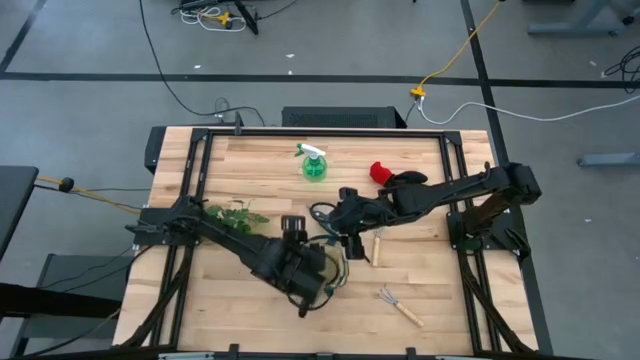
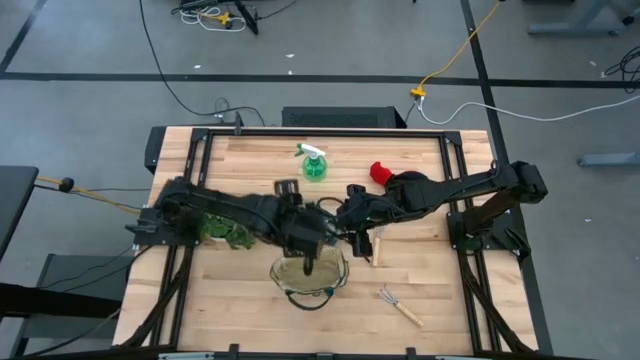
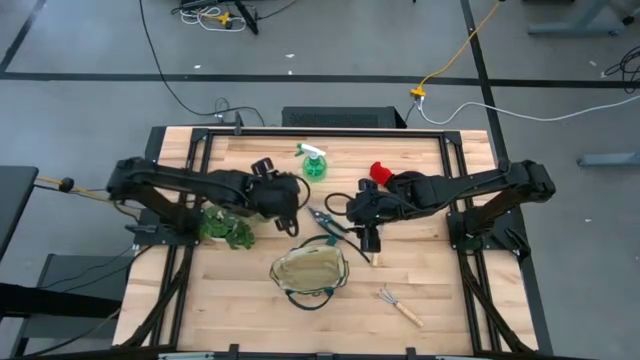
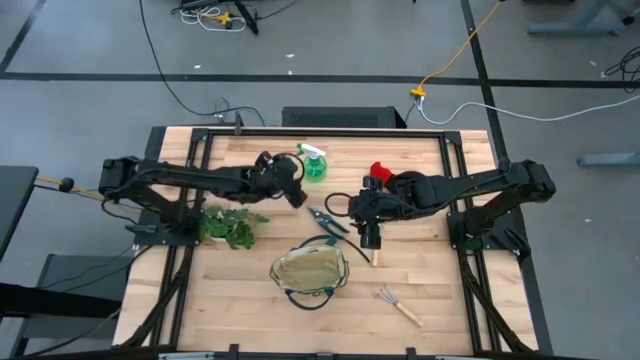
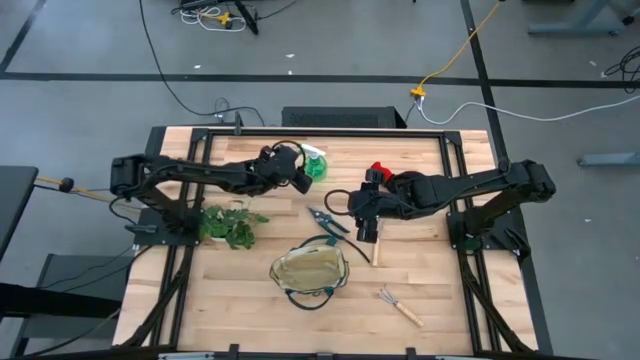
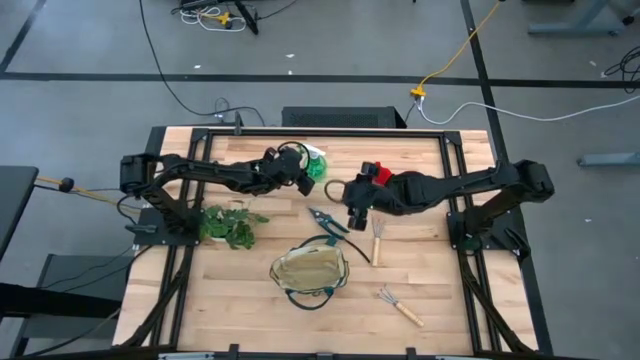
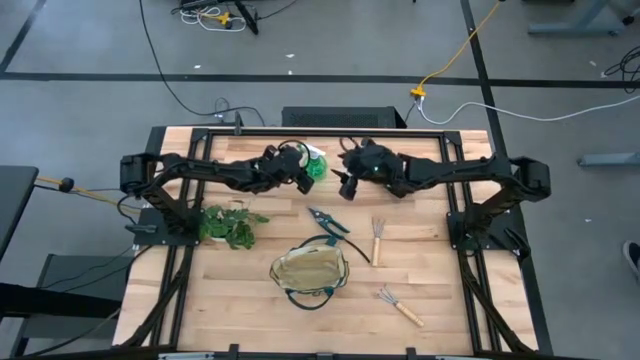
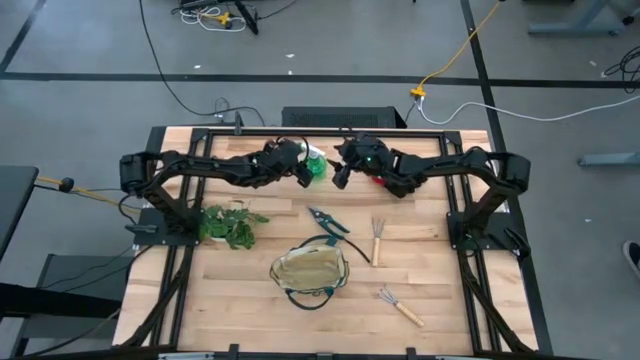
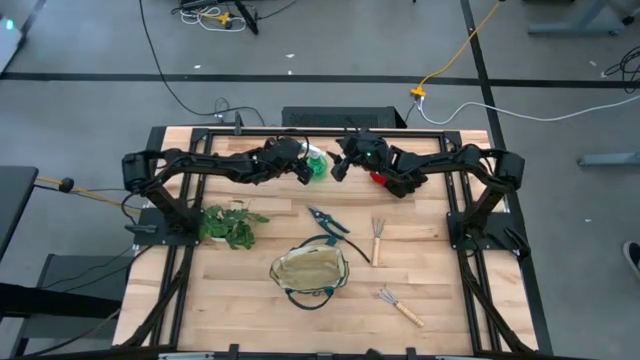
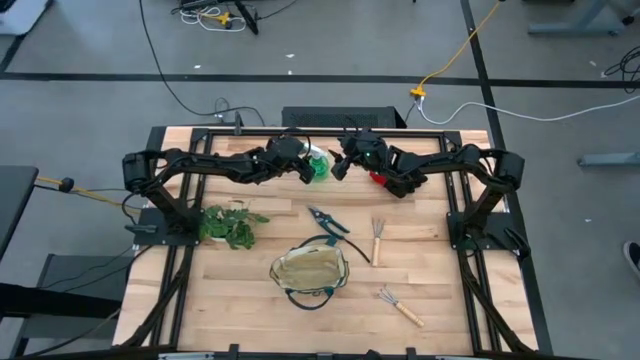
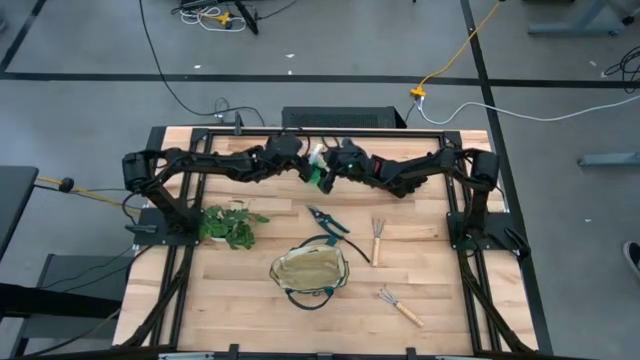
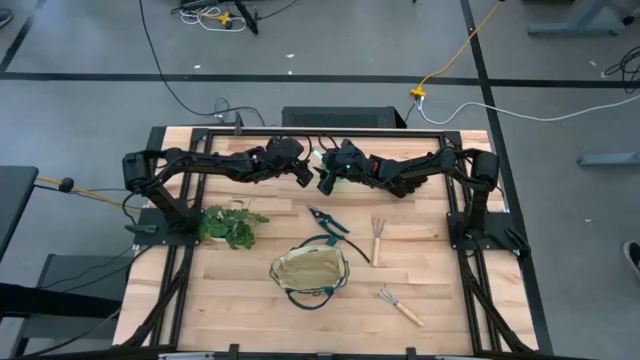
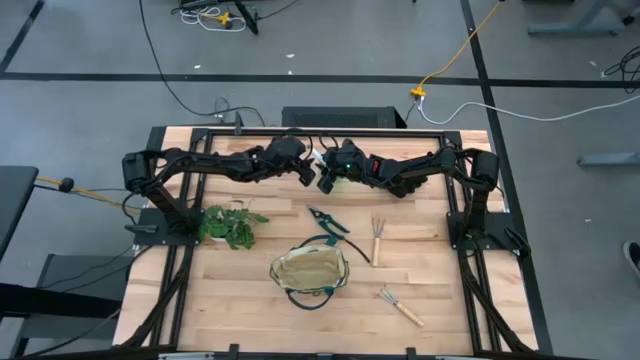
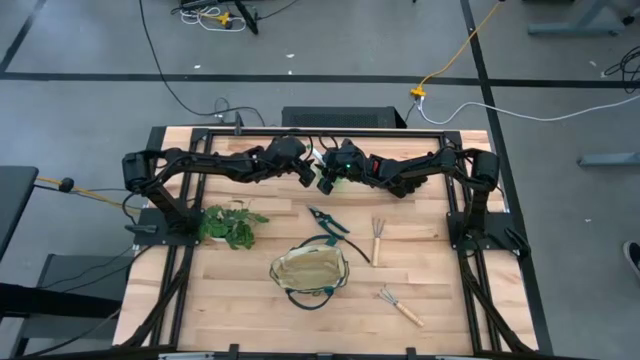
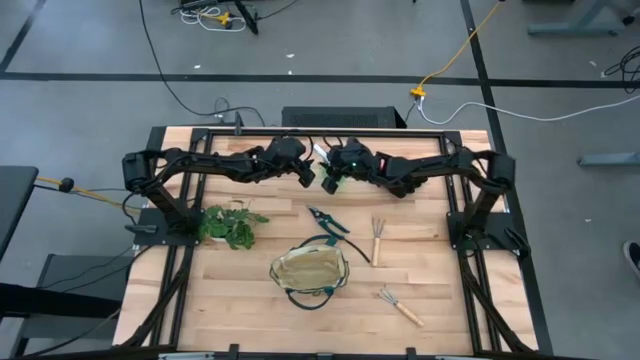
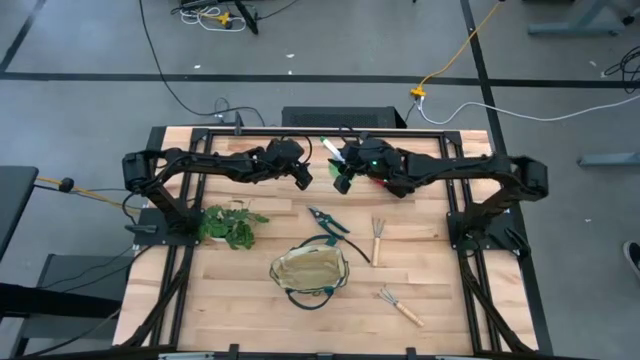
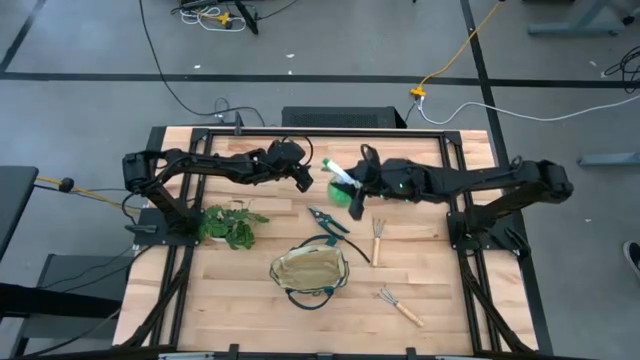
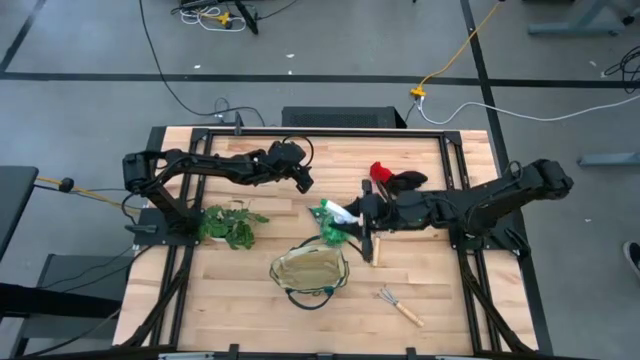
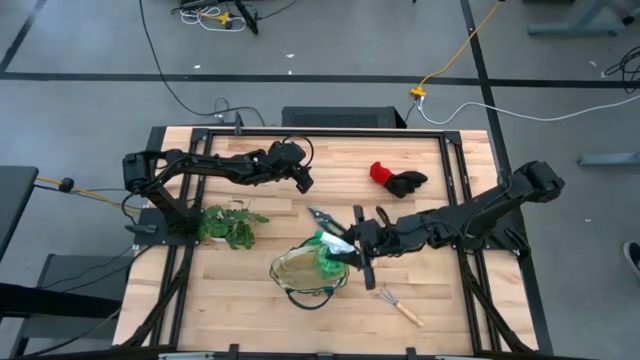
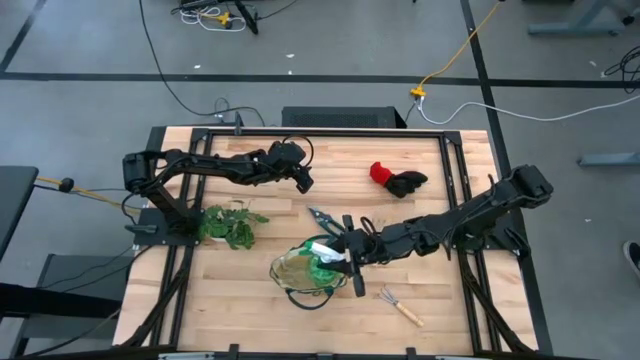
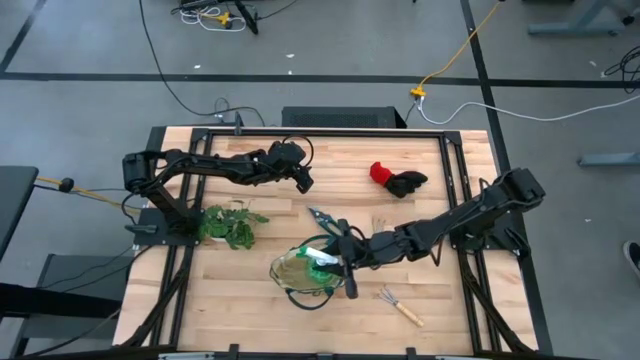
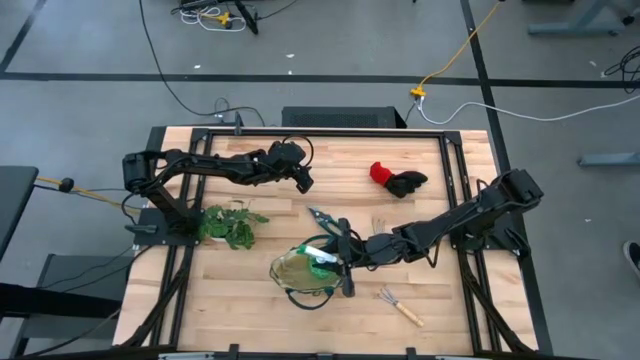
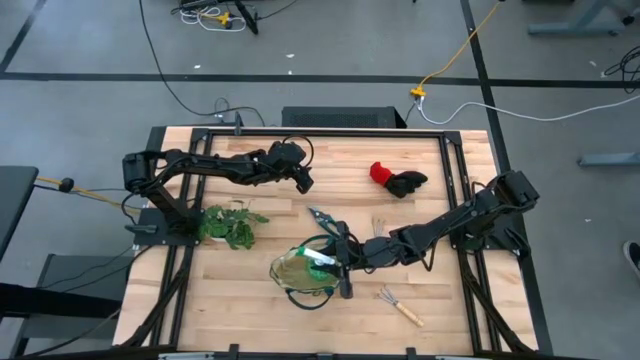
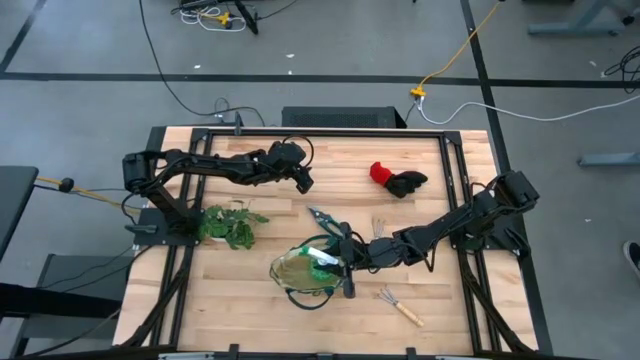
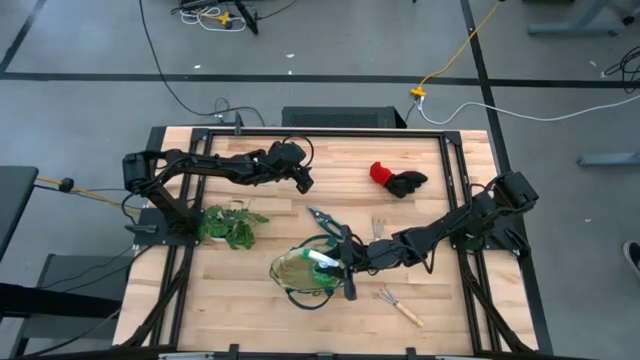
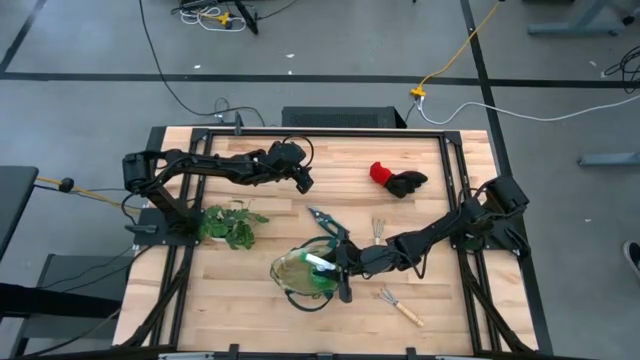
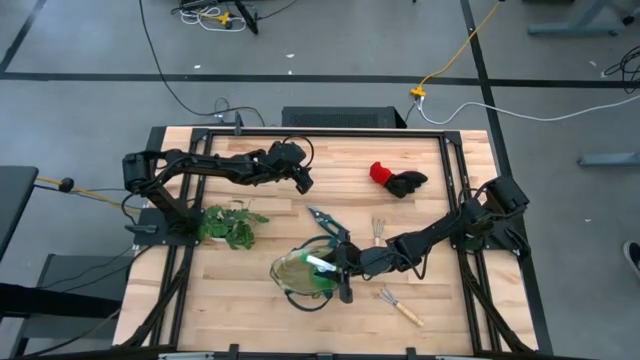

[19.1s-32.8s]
Task: Pick & Place Garden tools in Gardening bag
Put the green spray bottle into the gardening bag

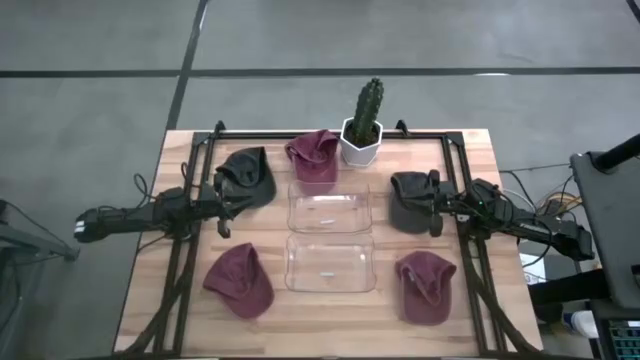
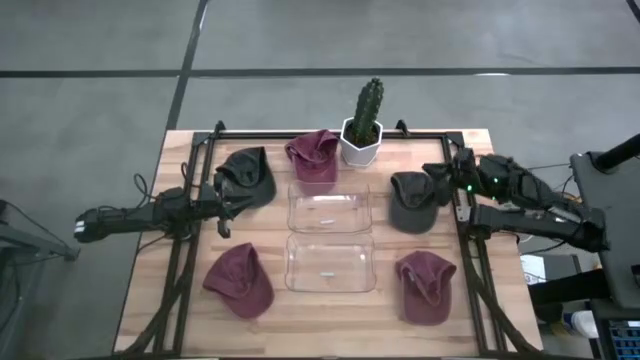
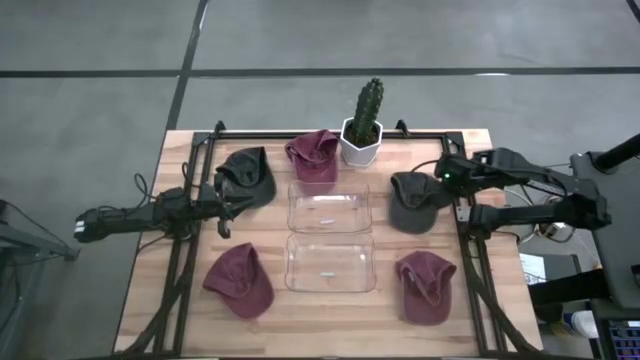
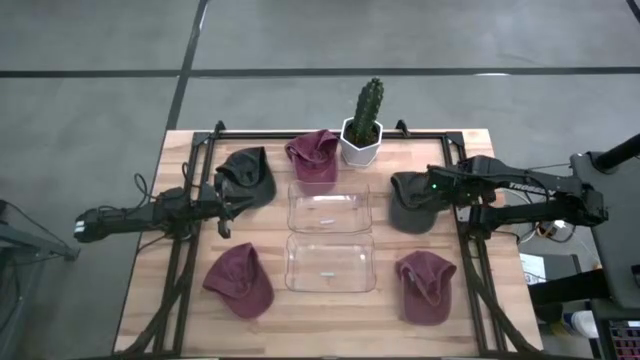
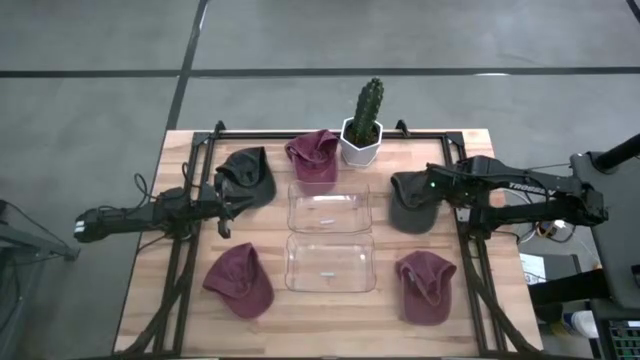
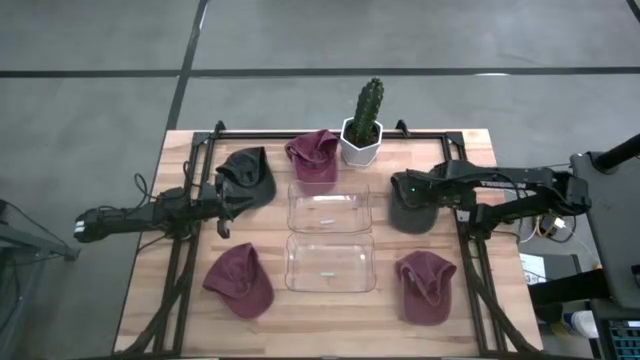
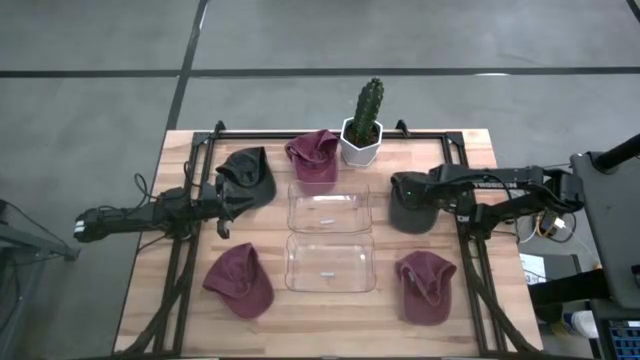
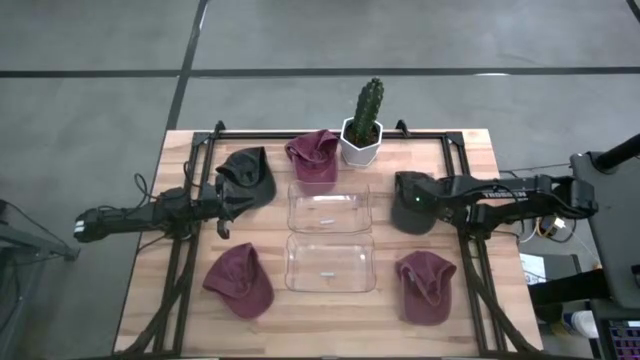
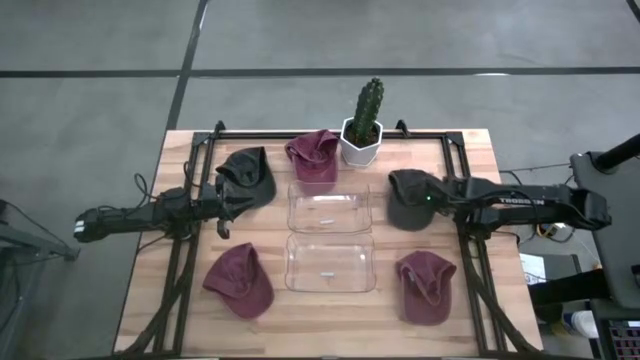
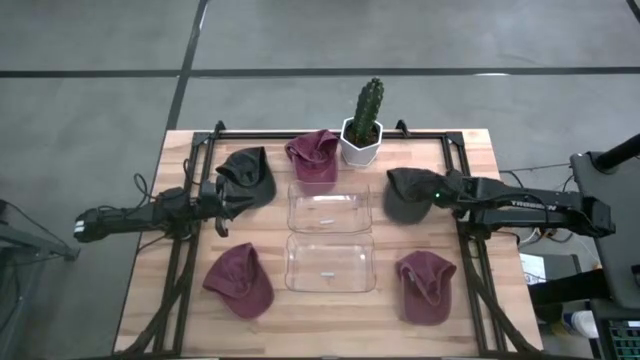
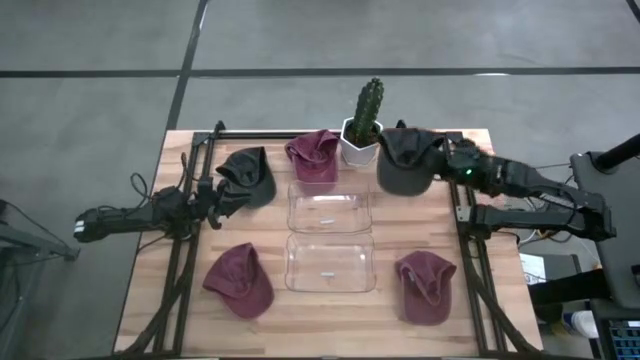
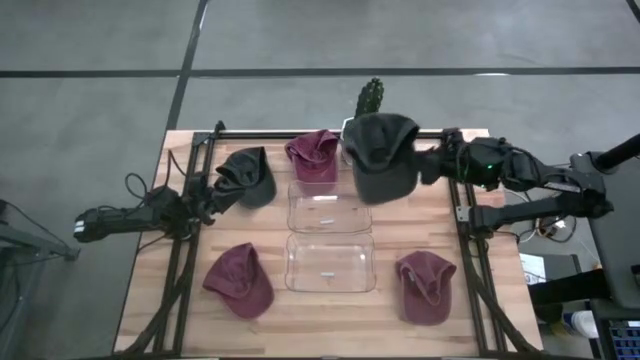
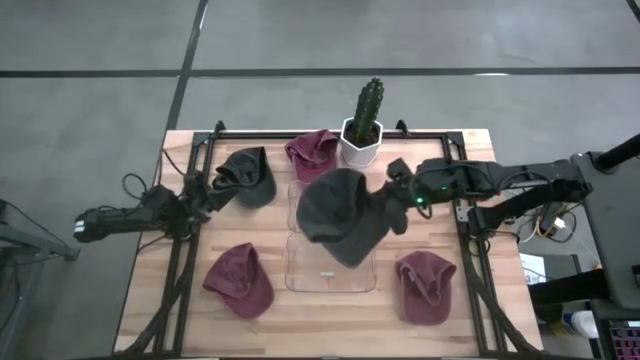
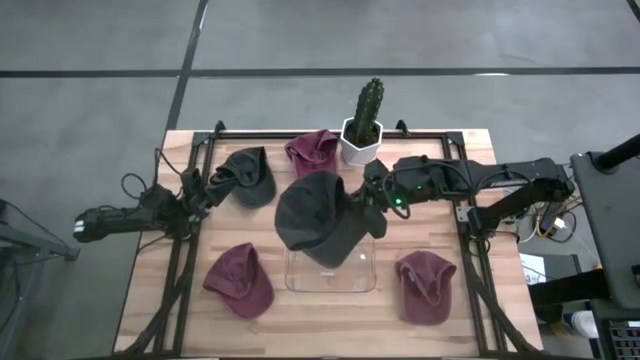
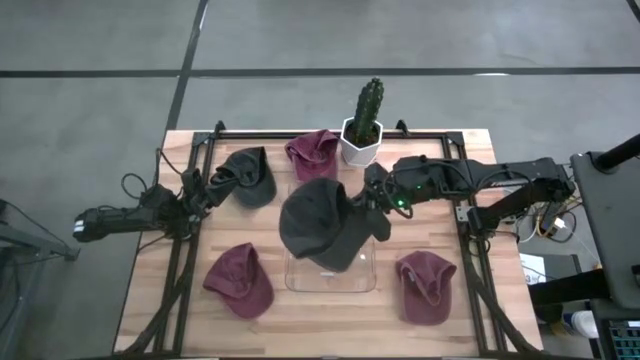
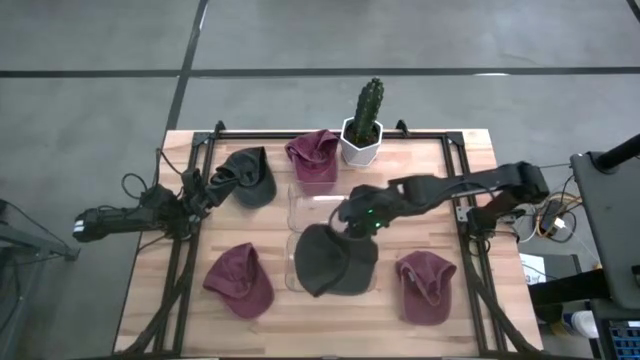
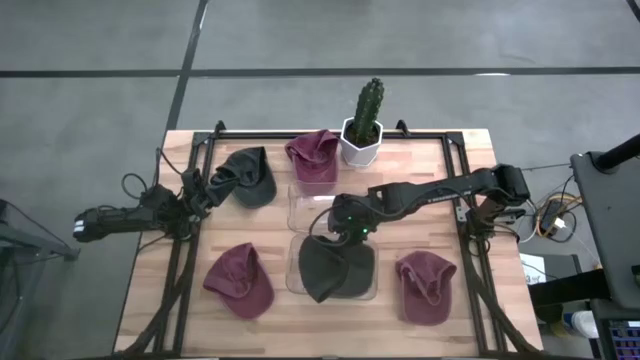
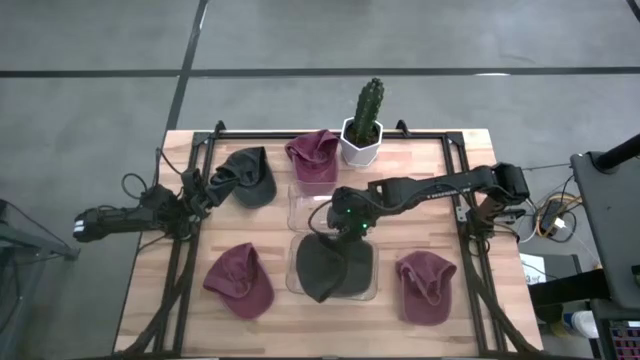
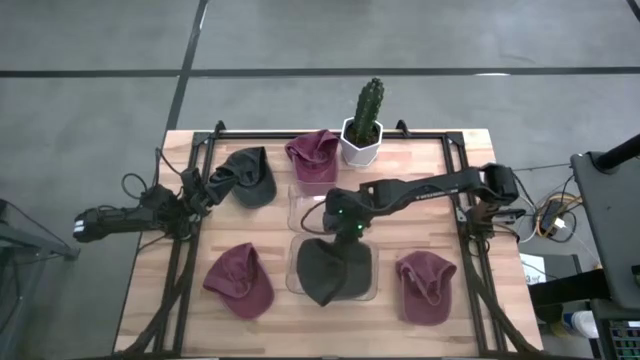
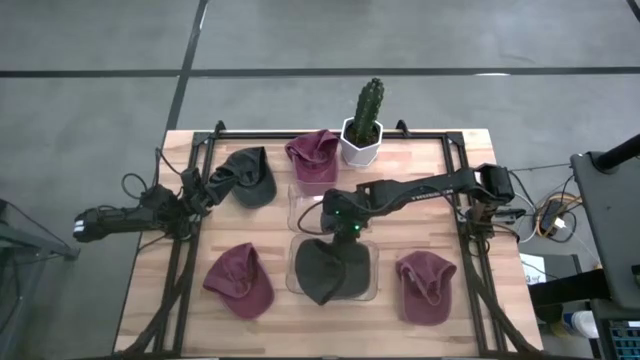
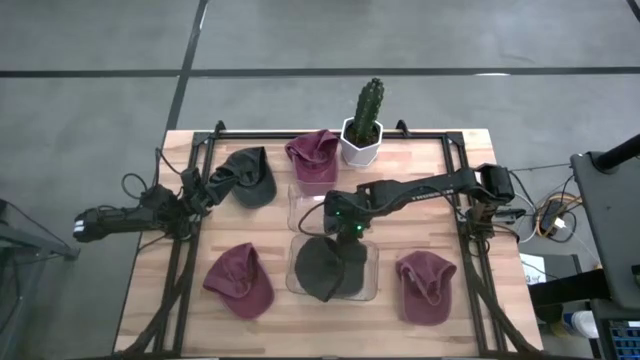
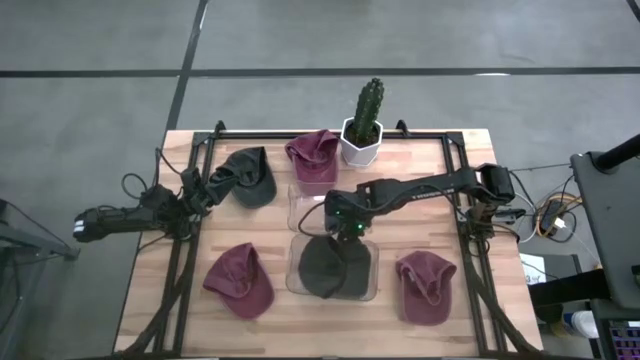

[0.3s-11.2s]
Task: Pick & Place hat
Put the right black cap into the bottom transparent bin
